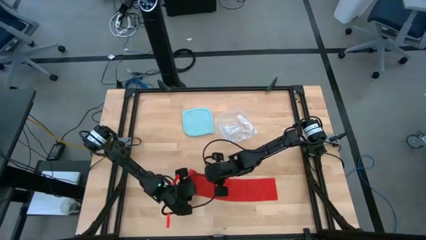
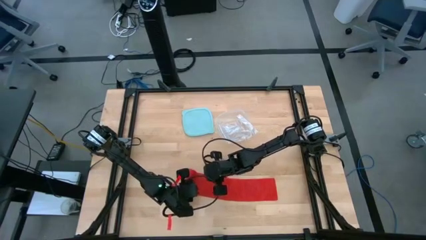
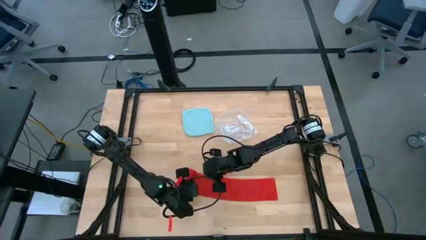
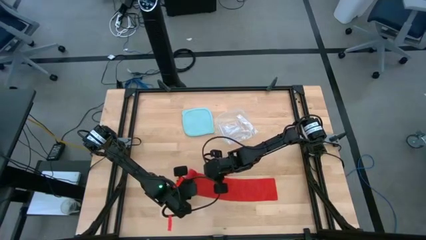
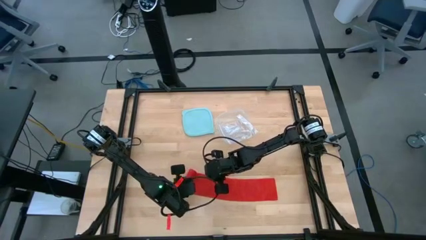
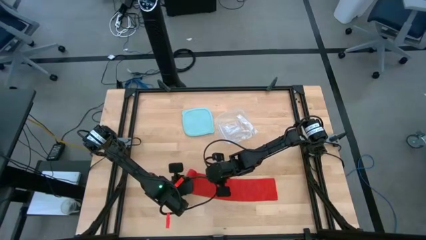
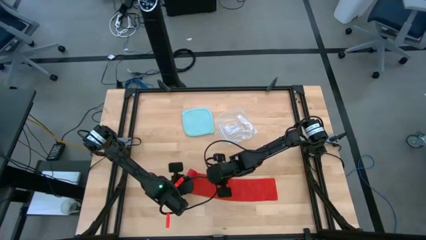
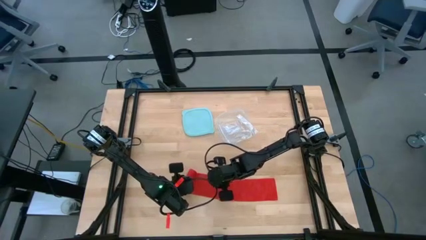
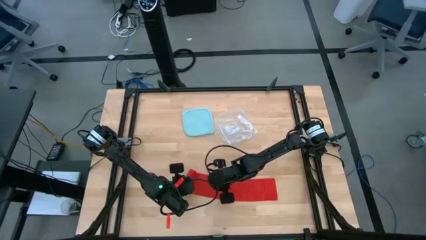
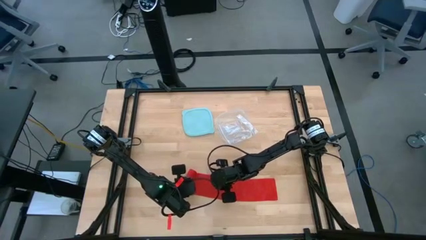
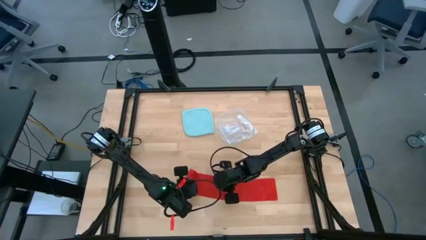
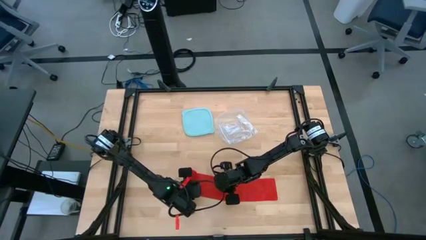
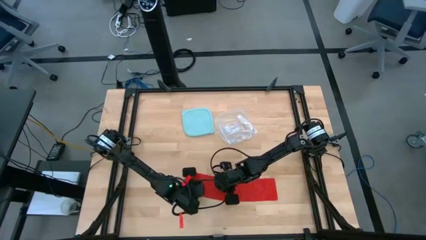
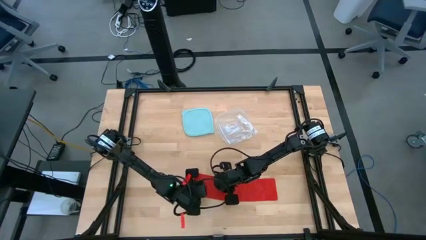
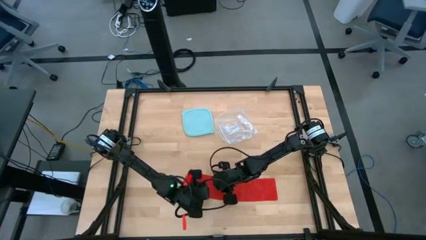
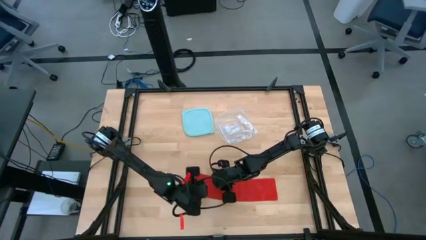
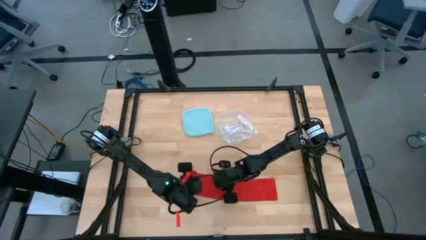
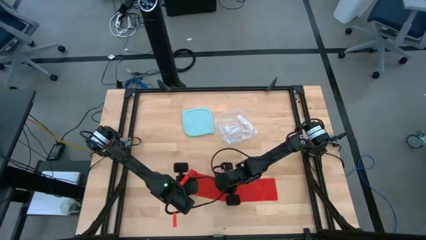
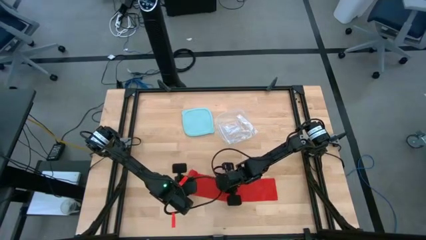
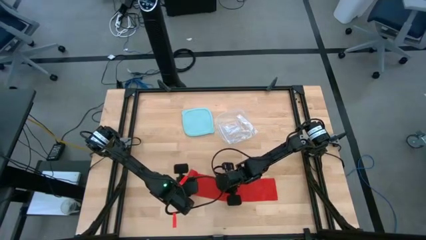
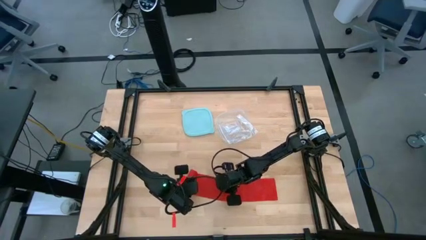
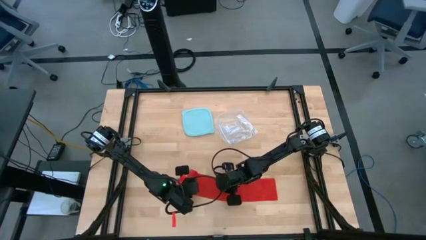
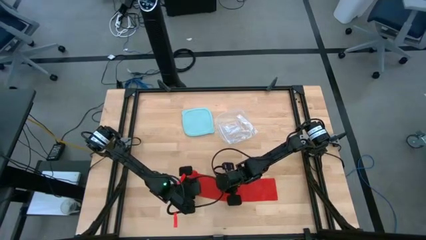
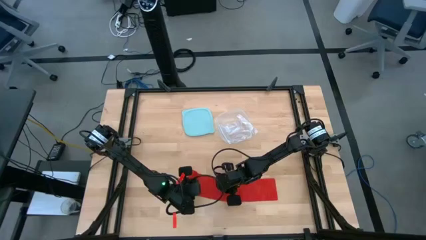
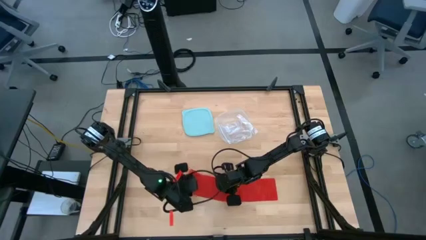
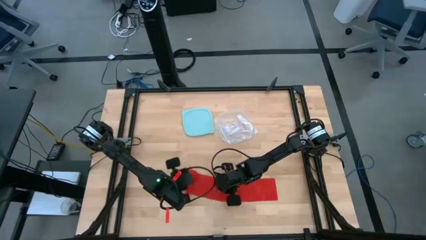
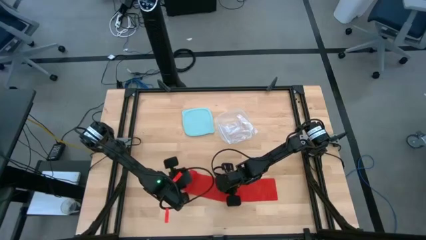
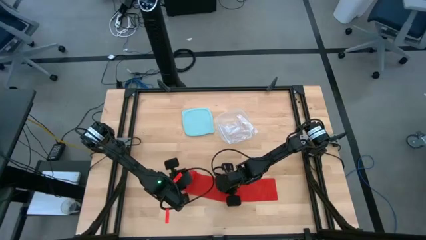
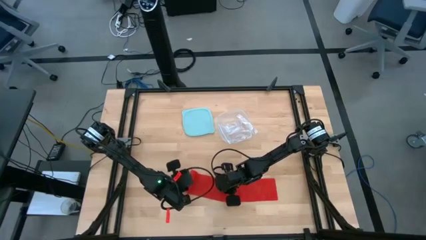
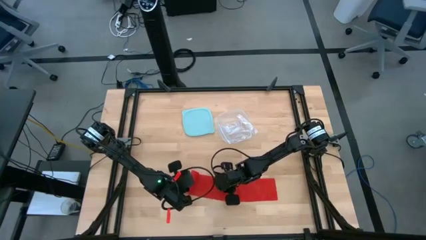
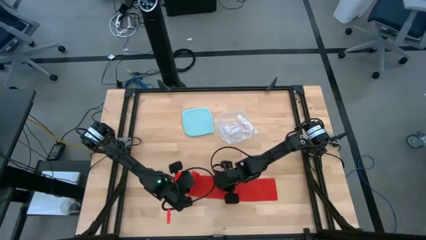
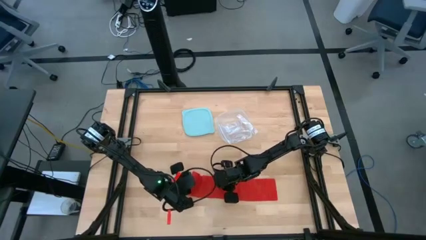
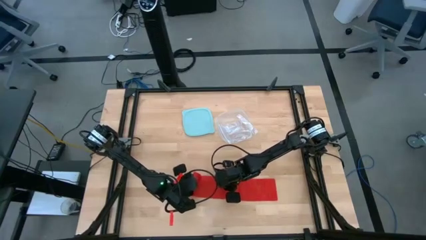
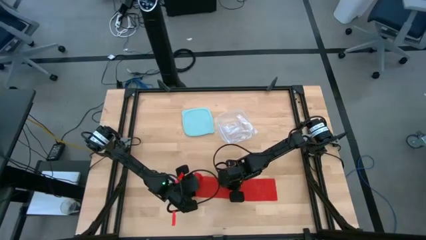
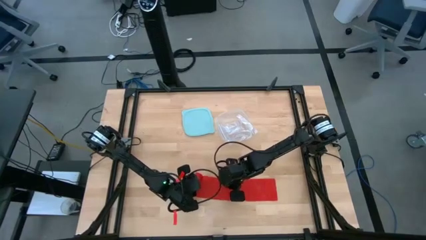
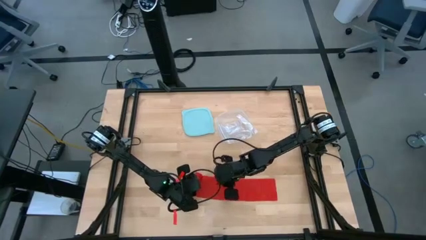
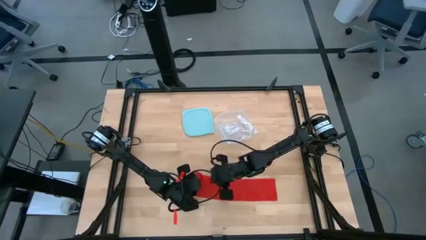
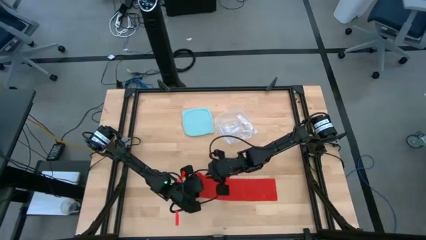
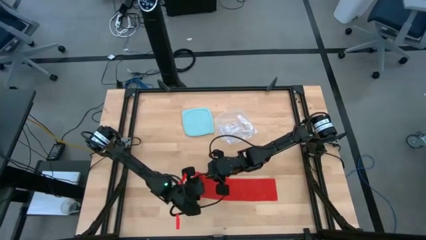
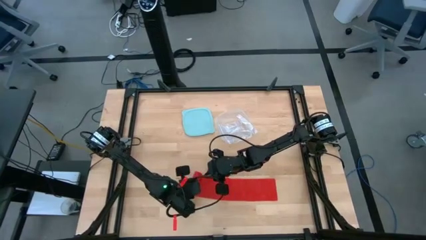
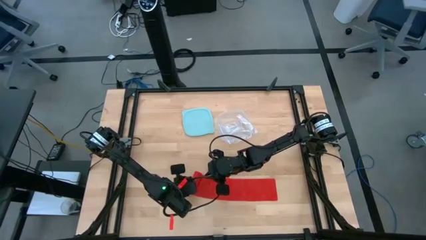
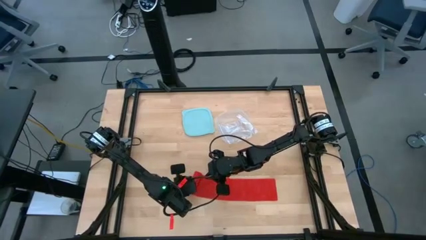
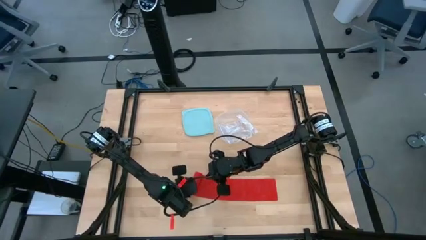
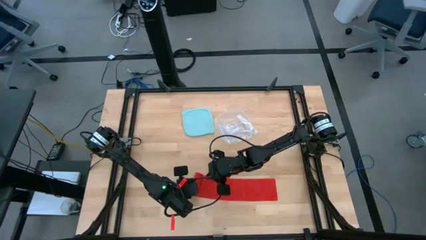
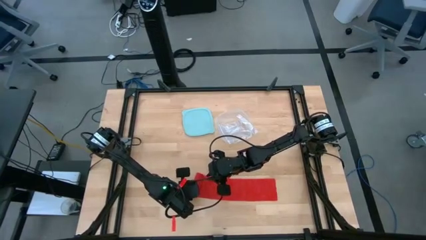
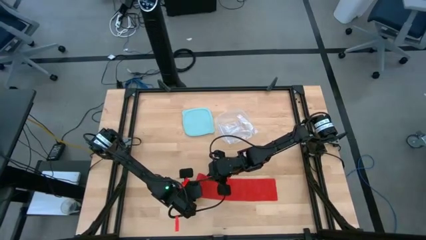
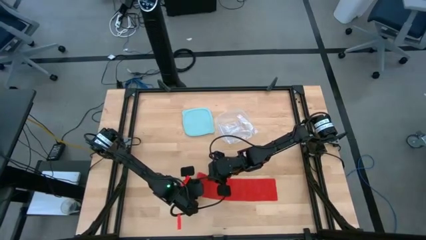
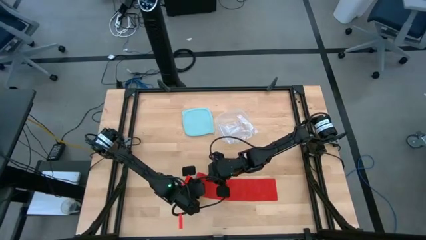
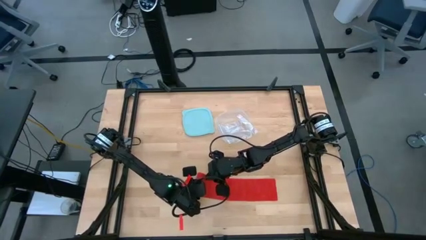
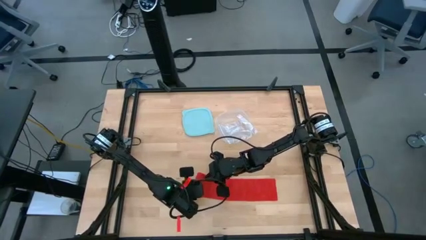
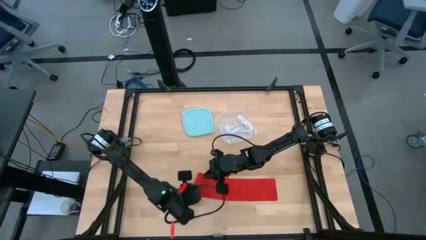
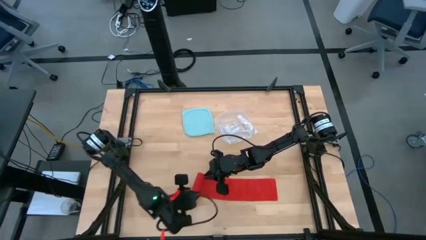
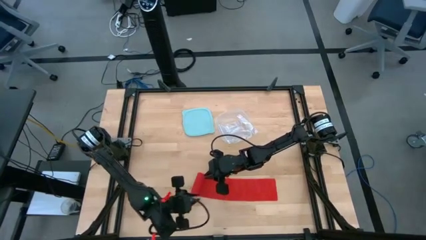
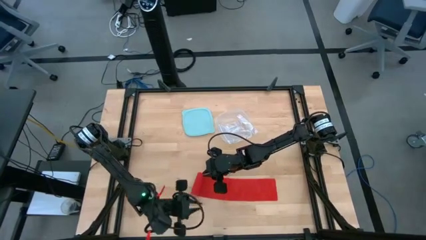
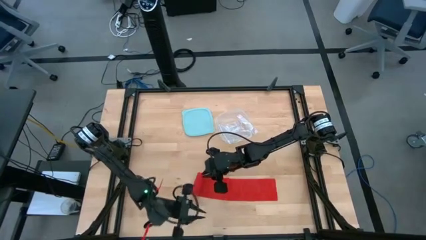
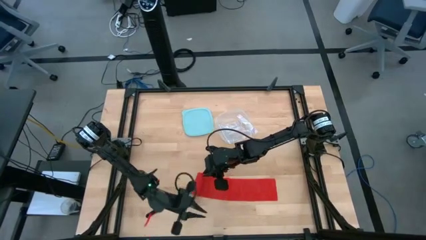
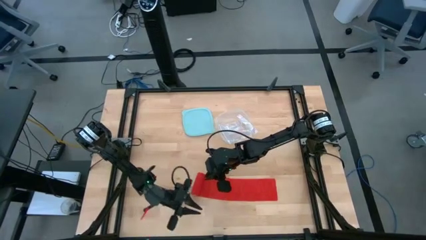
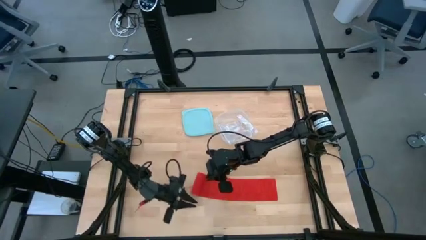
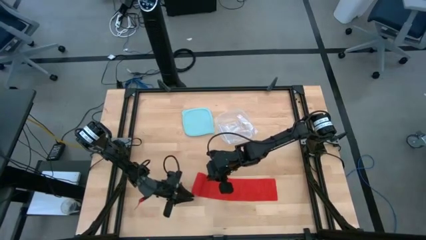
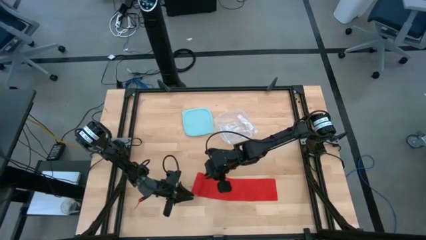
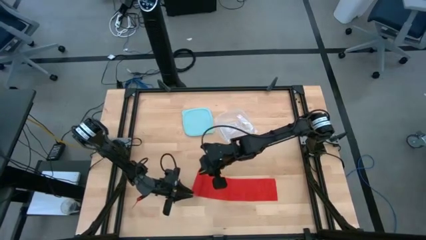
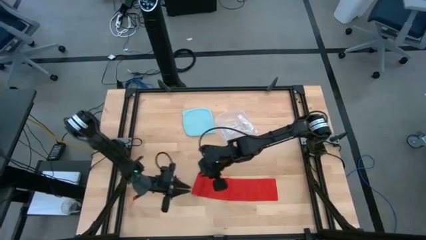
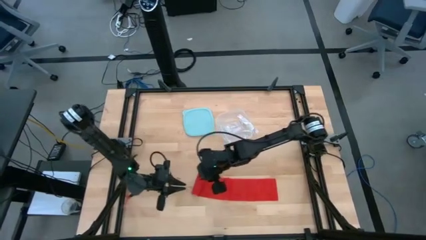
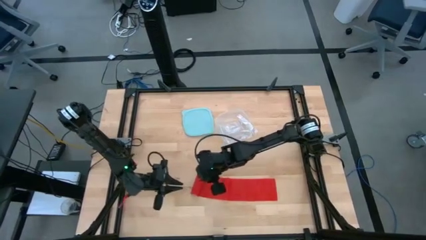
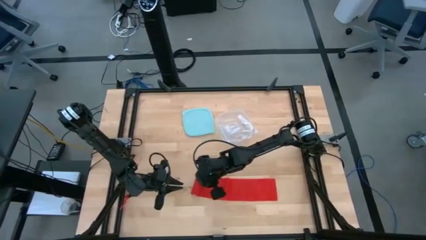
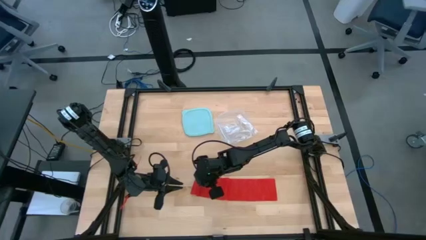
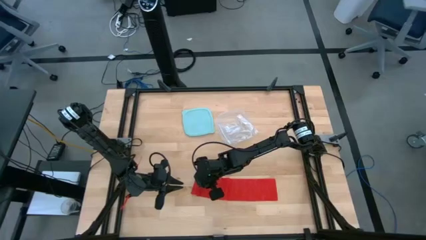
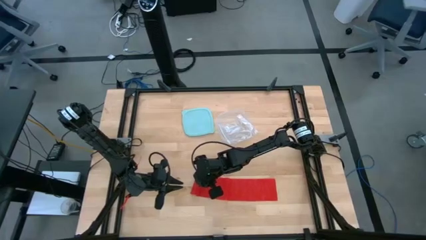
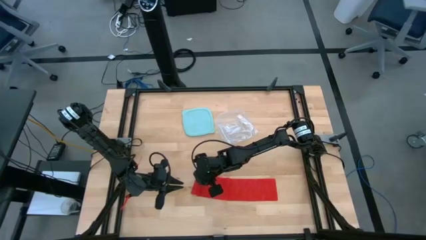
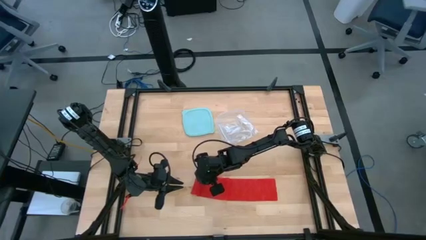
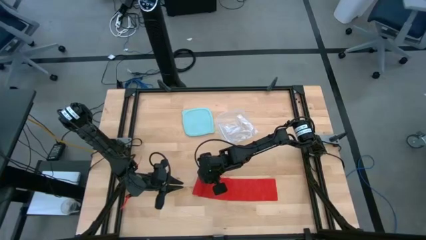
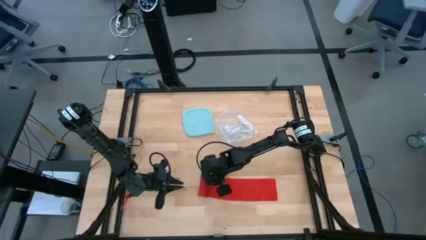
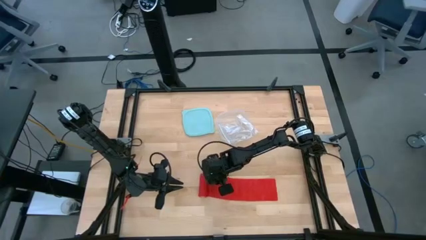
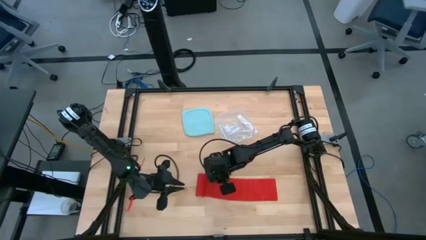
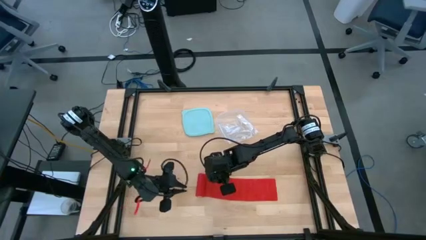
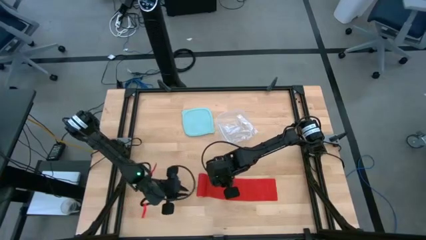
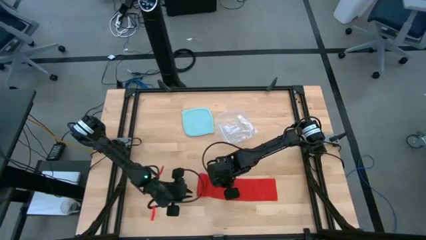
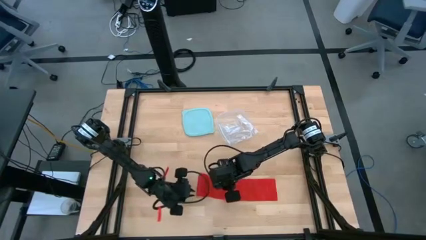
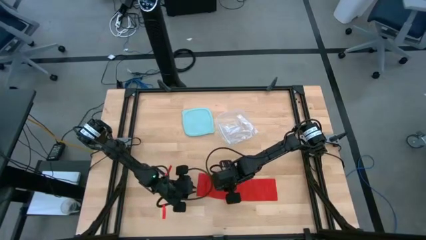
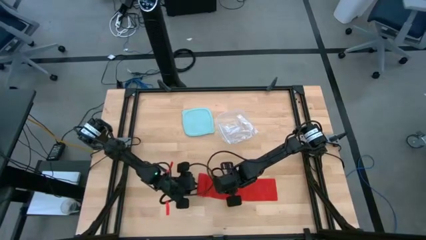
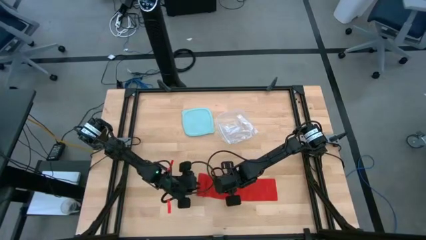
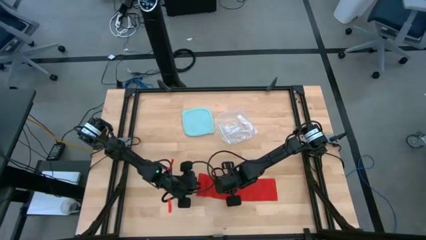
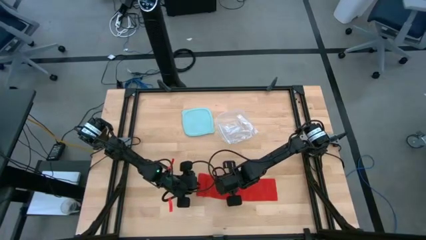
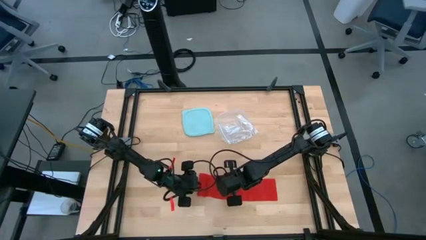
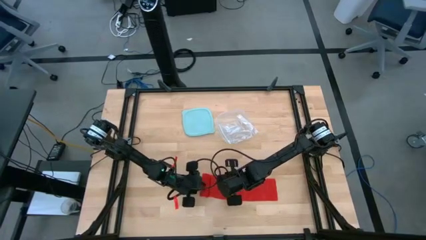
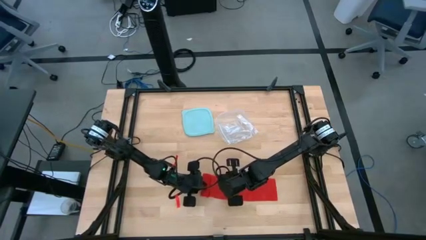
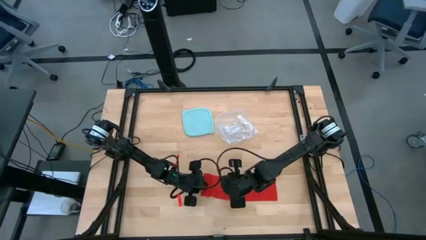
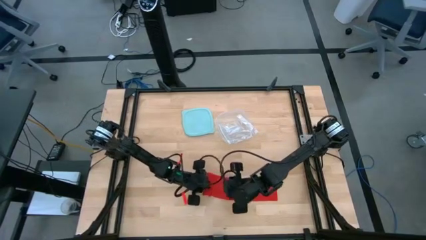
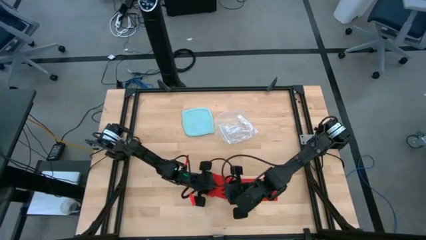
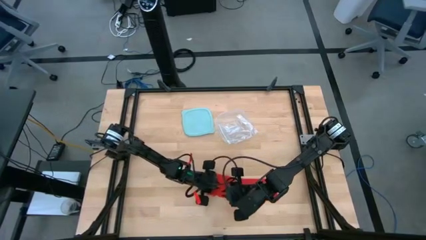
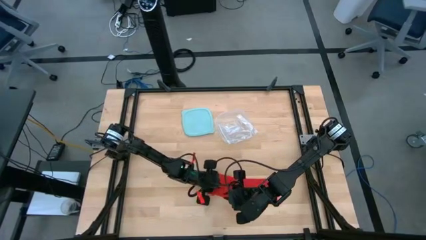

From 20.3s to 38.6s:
Task: Roll bandage
Roll the red bandage
